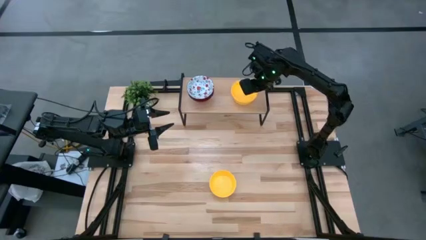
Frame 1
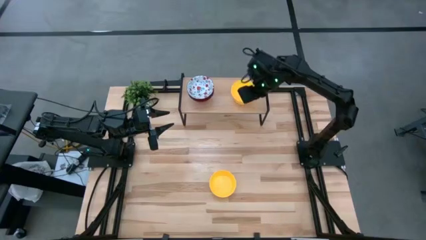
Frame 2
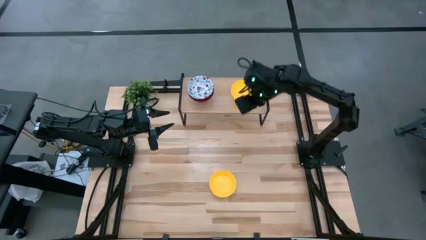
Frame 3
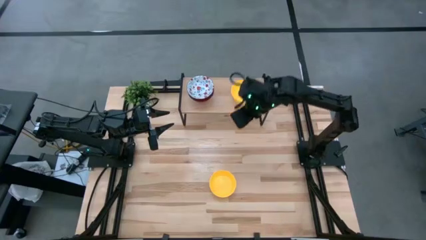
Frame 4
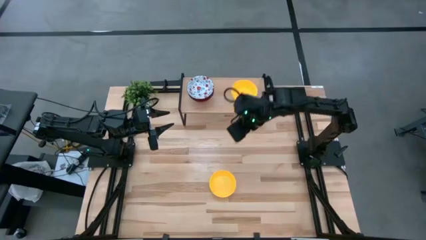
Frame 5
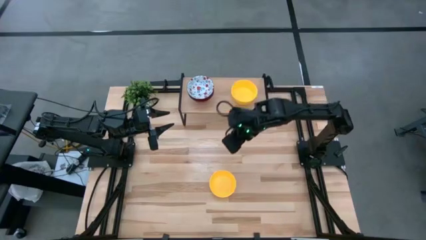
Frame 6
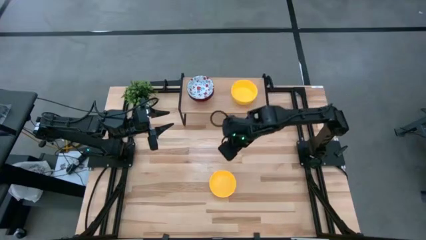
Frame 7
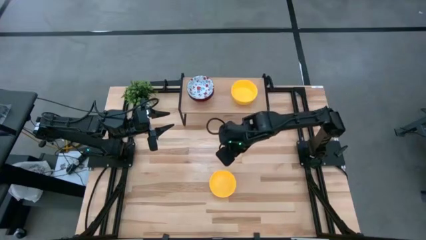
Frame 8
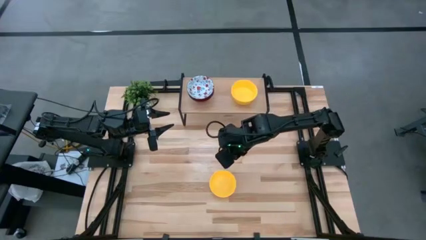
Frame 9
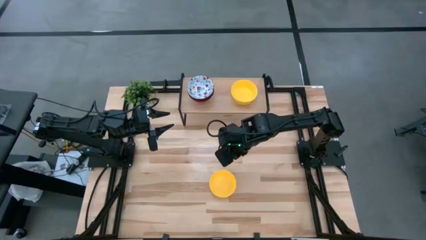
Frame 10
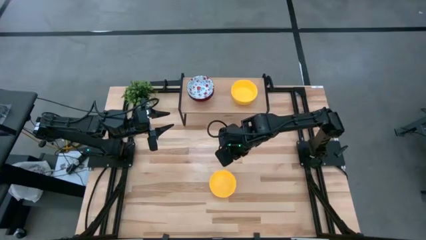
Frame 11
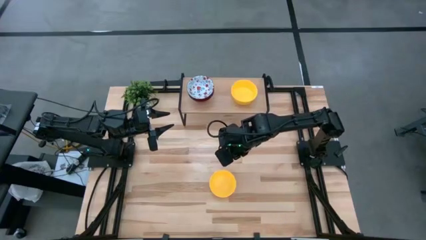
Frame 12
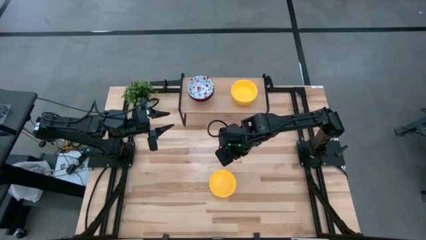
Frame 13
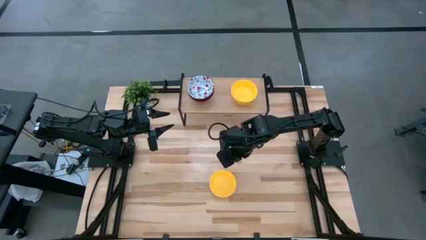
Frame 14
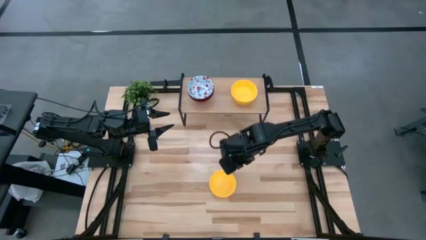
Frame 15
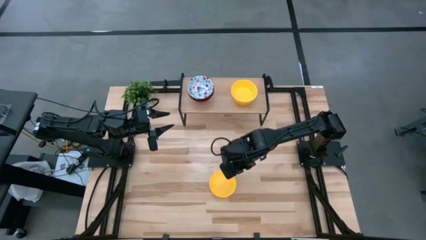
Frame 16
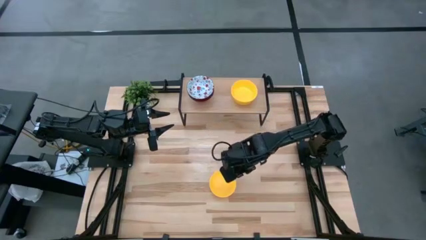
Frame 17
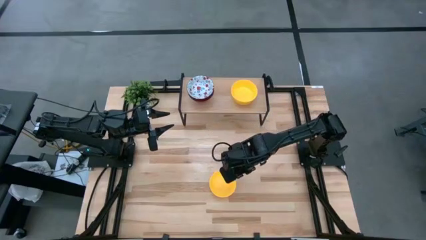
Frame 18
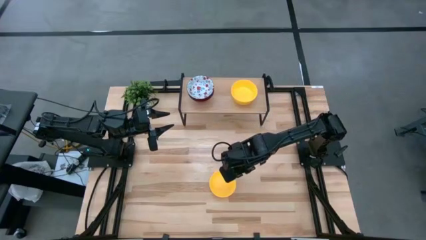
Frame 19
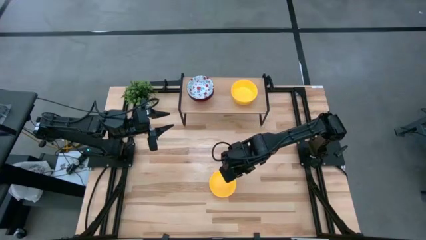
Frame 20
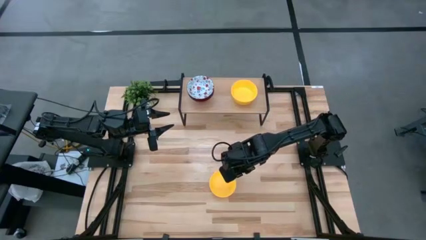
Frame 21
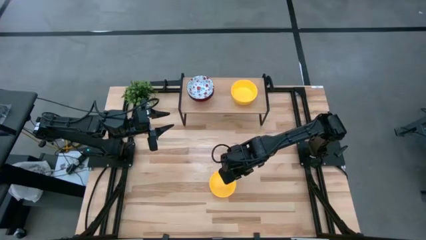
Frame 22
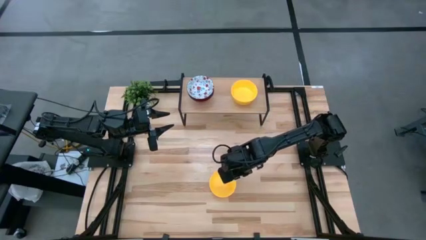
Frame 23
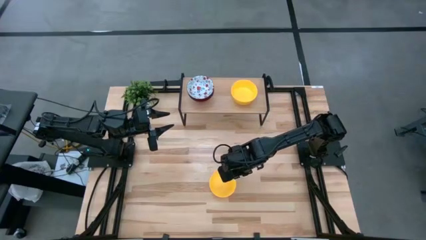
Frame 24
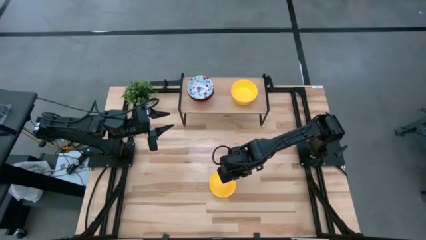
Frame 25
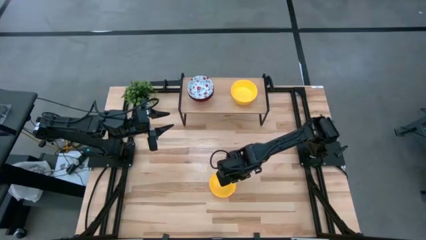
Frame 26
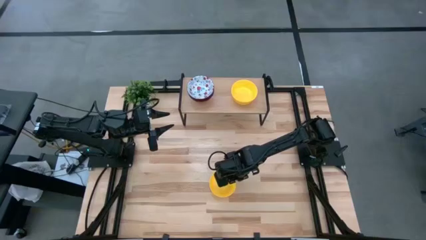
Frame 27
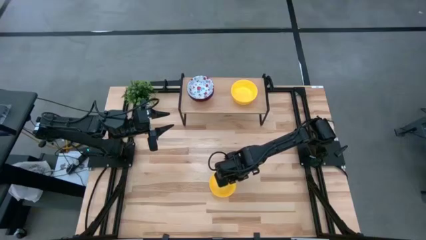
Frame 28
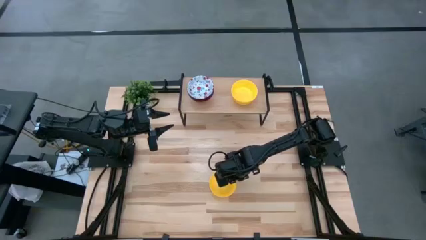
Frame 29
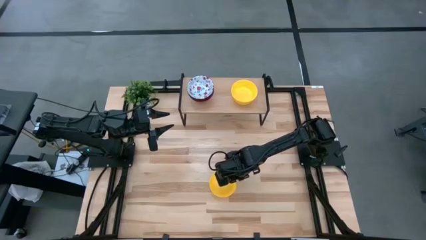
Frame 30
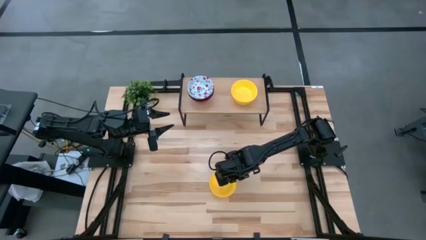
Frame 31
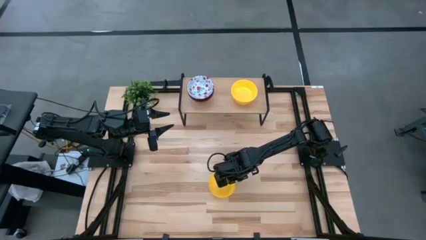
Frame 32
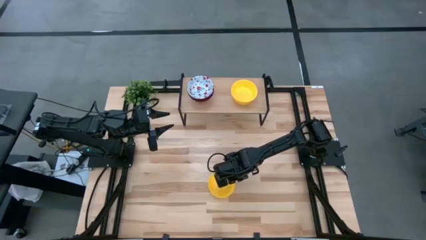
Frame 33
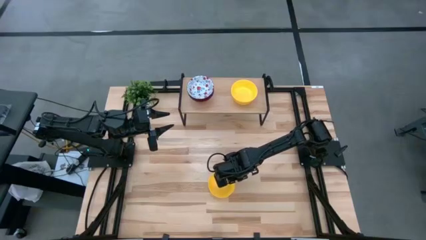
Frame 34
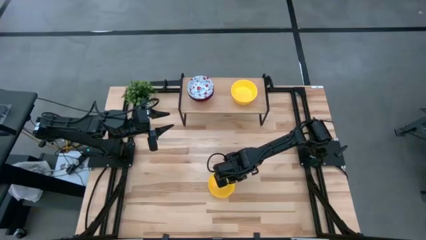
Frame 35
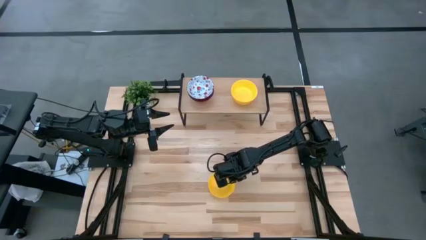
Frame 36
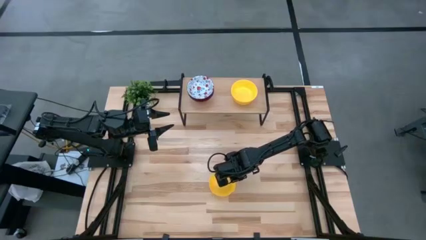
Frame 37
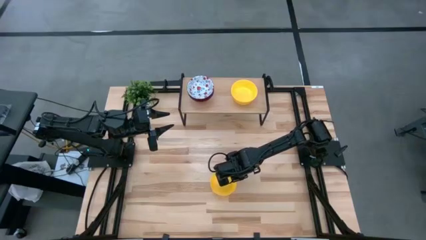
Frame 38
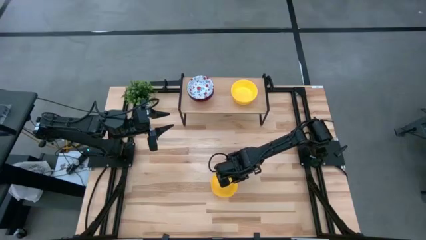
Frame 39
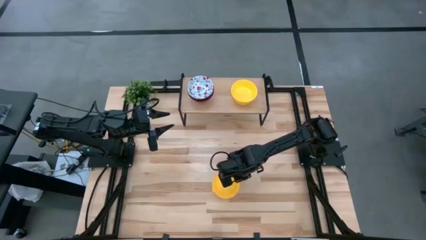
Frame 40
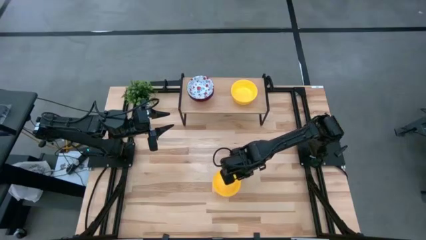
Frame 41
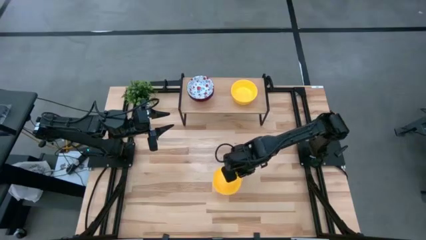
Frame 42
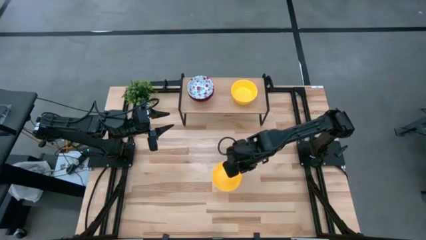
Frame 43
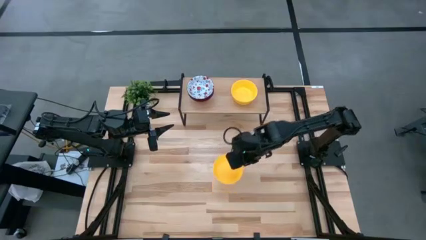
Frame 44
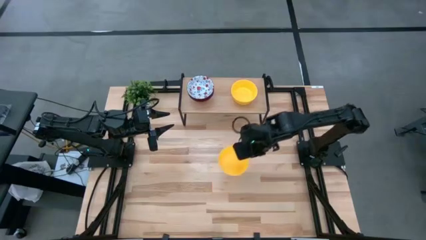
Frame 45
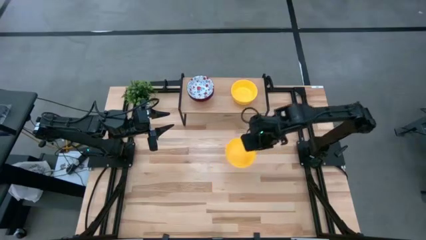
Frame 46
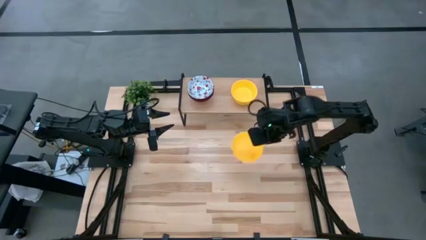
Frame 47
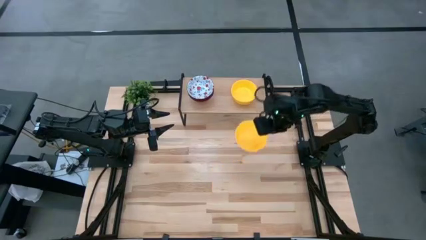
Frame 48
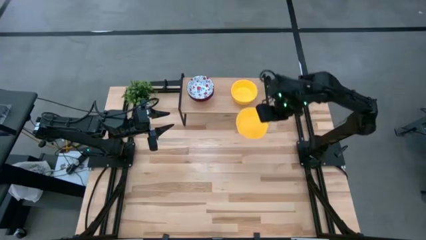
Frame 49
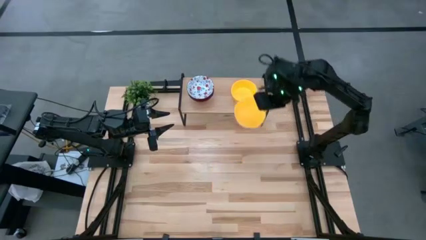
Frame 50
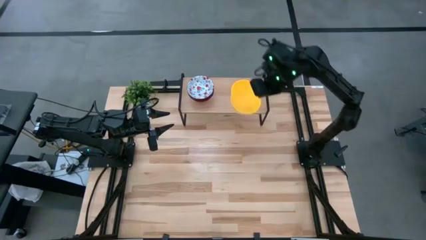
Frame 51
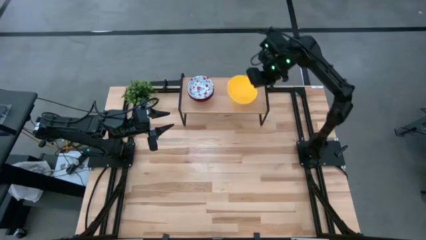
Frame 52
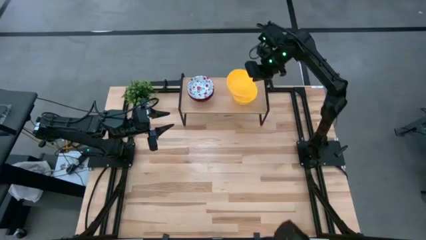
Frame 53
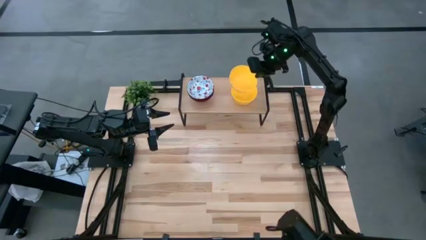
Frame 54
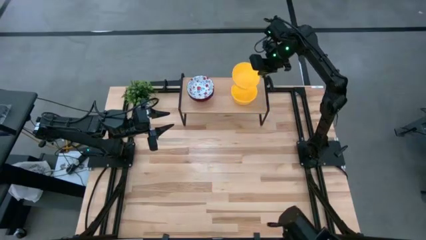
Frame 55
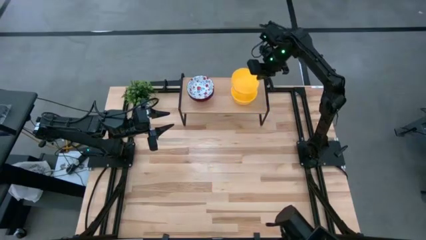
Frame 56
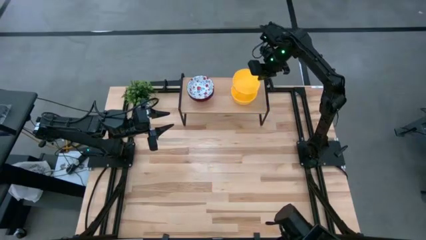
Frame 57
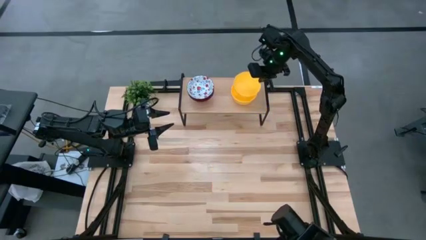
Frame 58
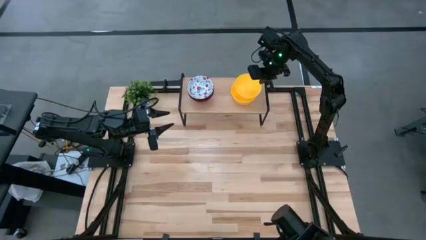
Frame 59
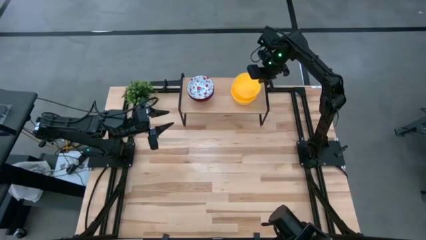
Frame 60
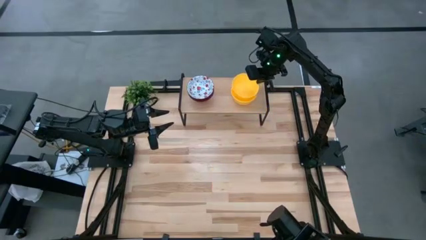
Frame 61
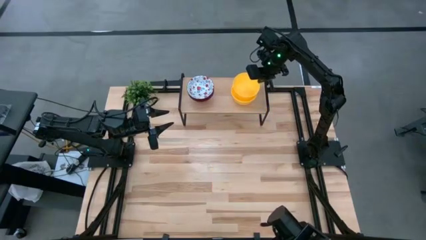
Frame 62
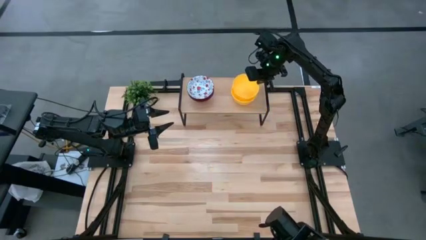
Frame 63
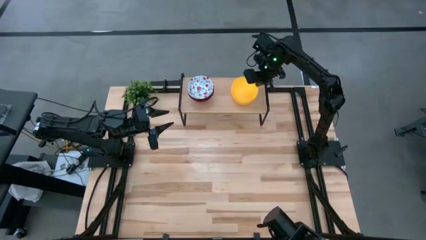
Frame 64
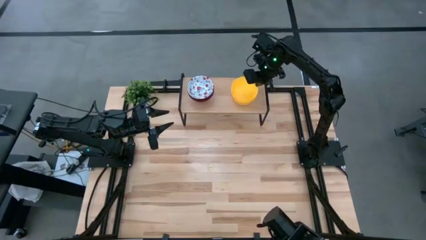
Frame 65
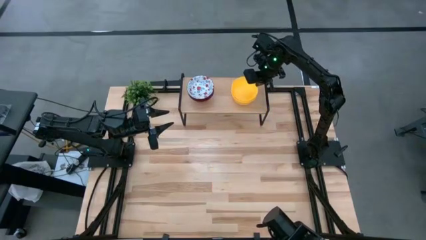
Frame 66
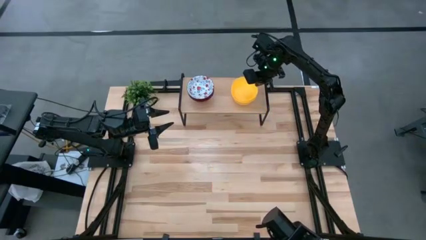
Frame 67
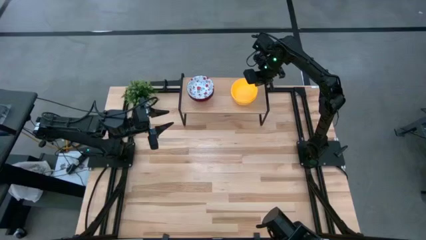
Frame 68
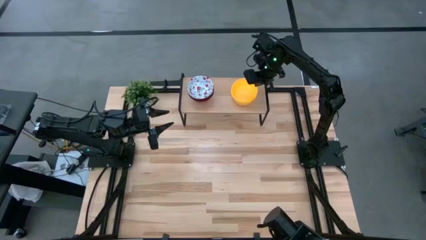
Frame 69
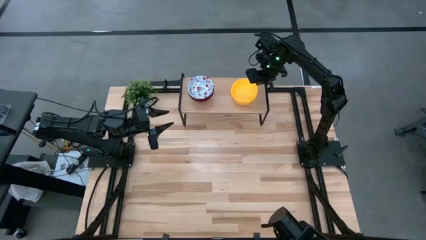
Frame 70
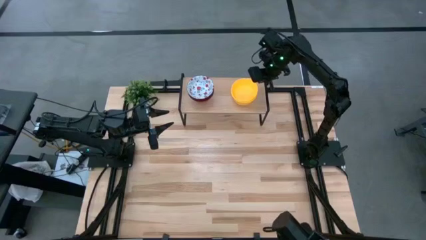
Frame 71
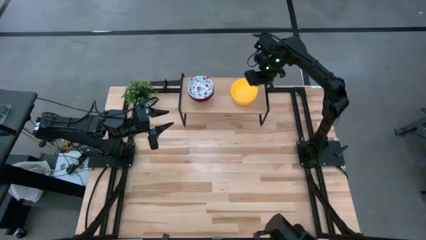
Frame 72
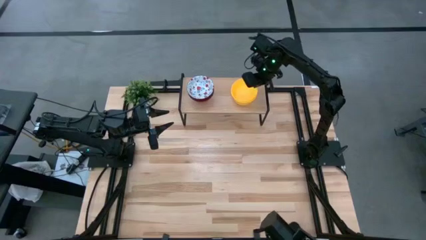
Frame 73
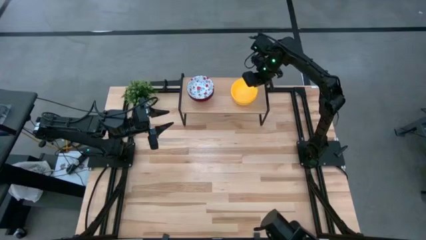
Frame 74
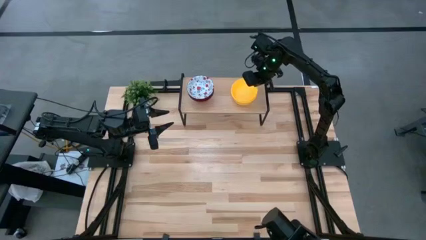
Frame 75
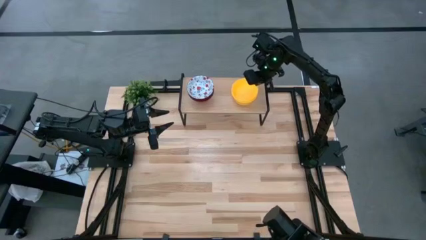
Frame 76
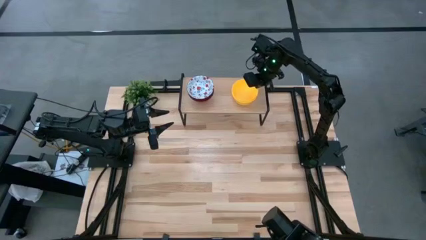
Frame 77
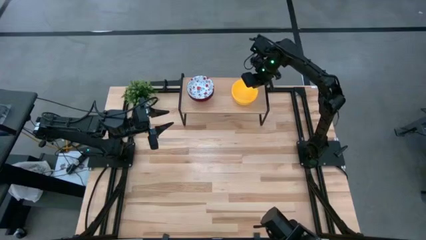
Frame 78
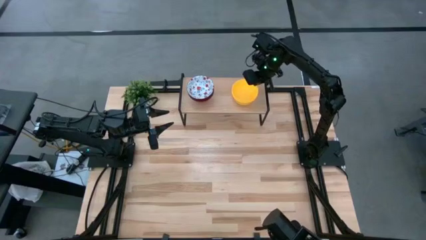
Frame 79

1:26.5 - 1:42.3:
Task: Pick & Place Mini bowls
Stack the yellow bowl on the yellow bowls on the shelf
